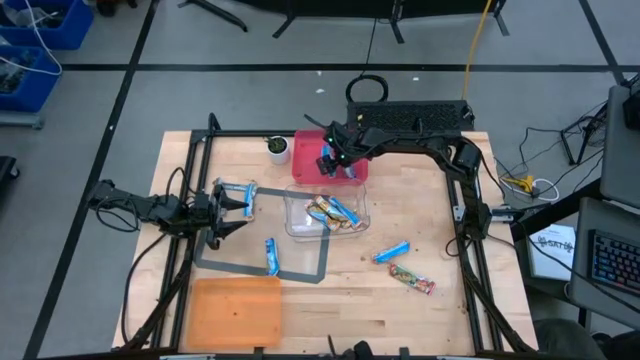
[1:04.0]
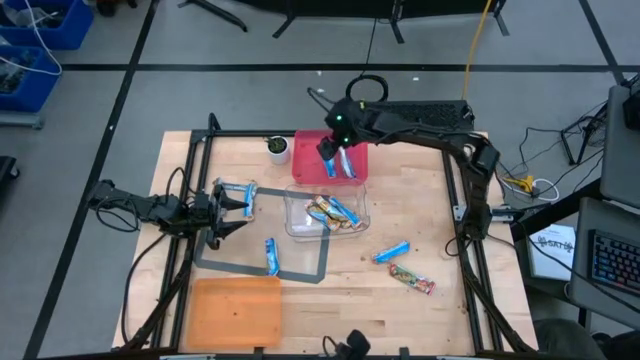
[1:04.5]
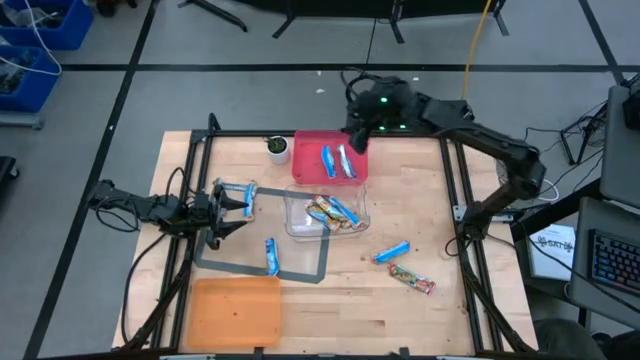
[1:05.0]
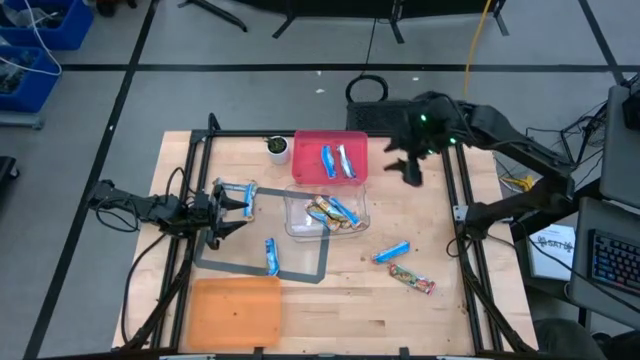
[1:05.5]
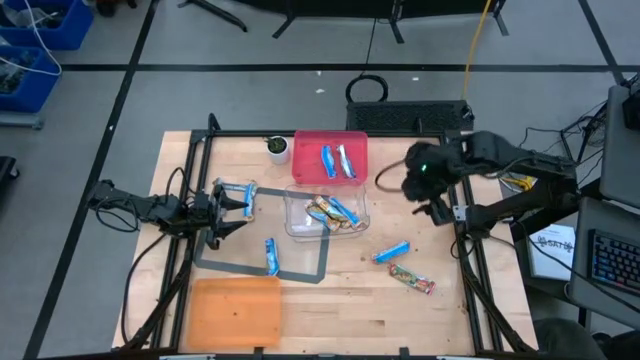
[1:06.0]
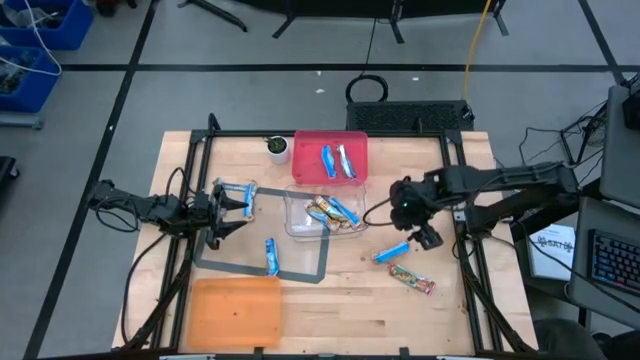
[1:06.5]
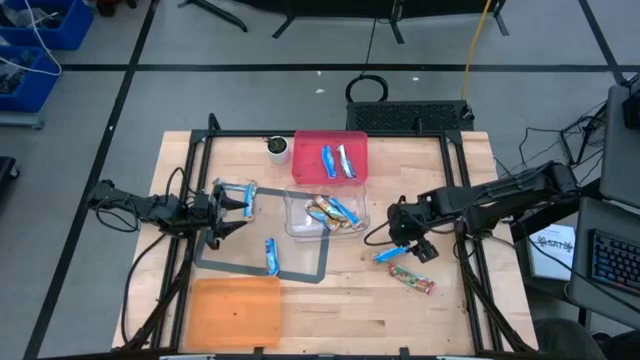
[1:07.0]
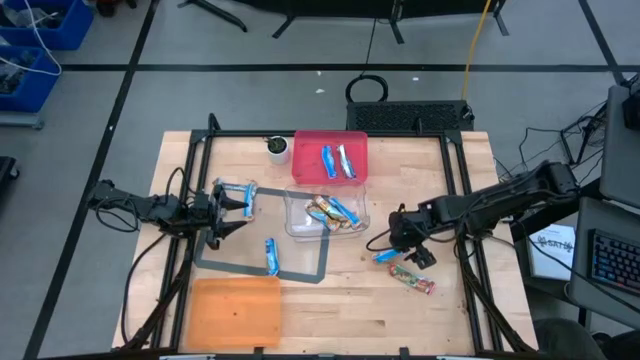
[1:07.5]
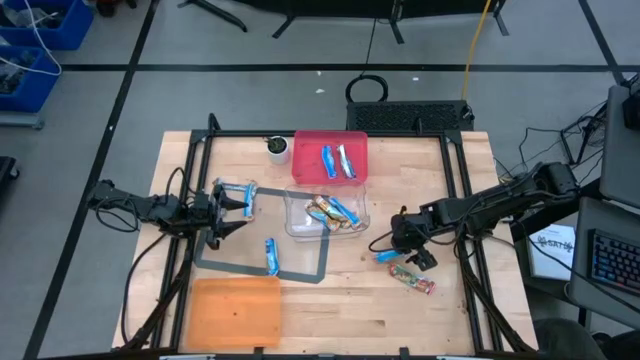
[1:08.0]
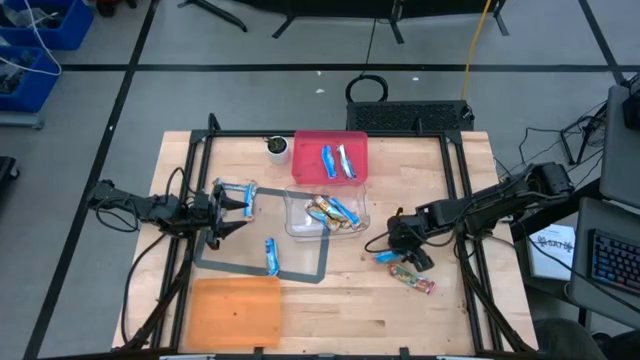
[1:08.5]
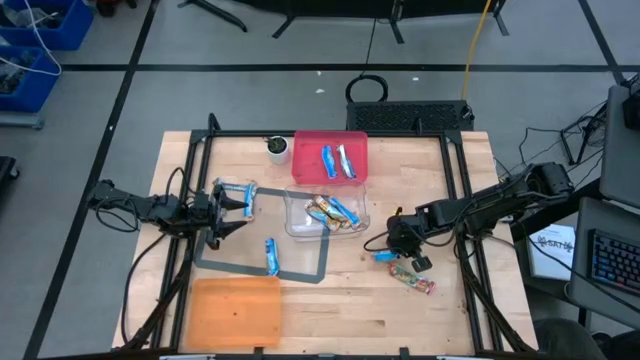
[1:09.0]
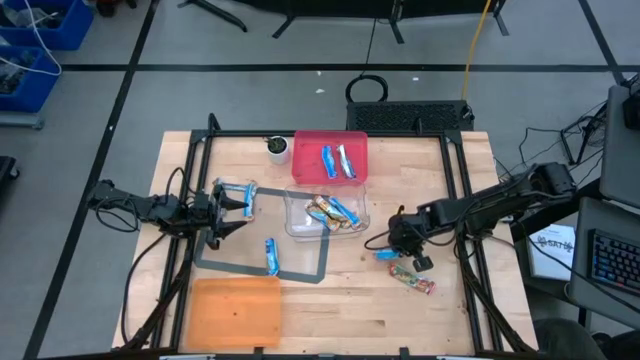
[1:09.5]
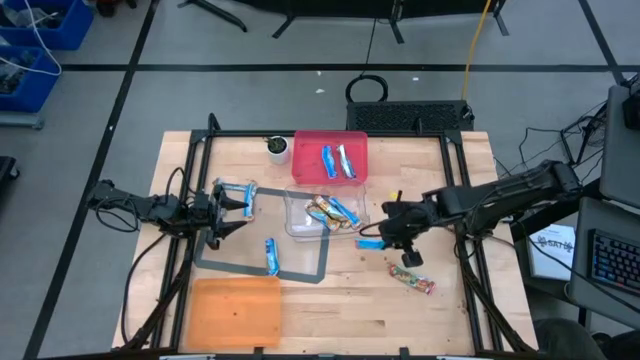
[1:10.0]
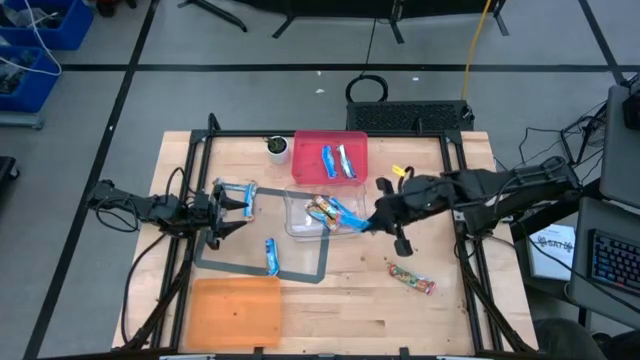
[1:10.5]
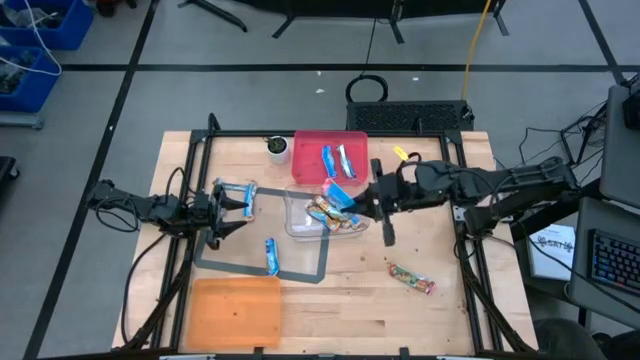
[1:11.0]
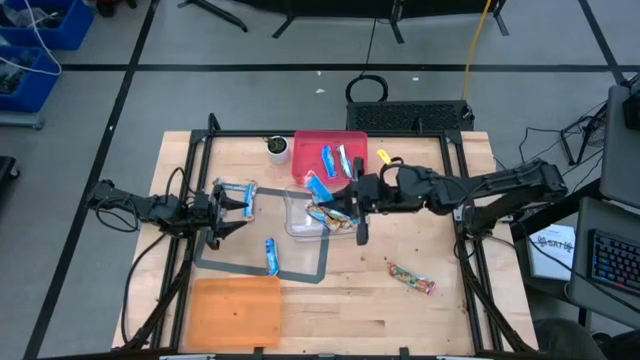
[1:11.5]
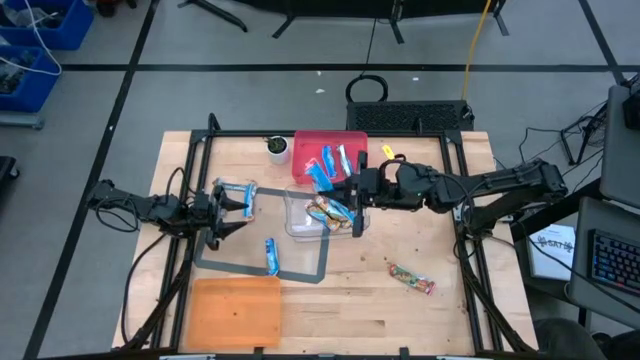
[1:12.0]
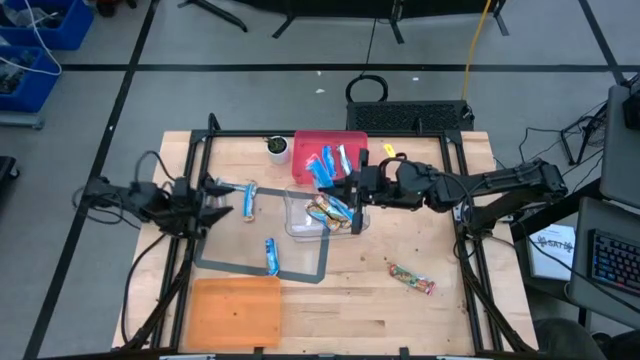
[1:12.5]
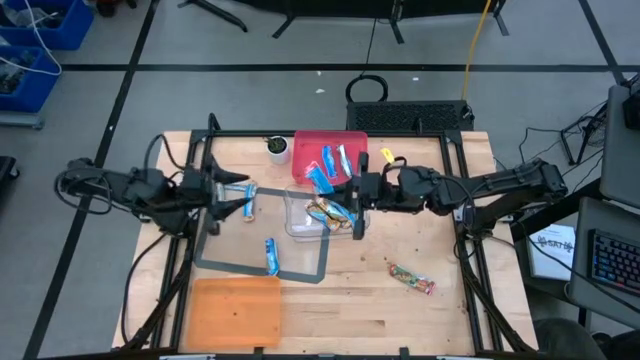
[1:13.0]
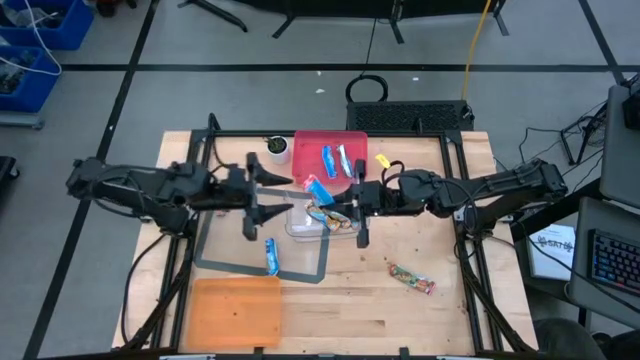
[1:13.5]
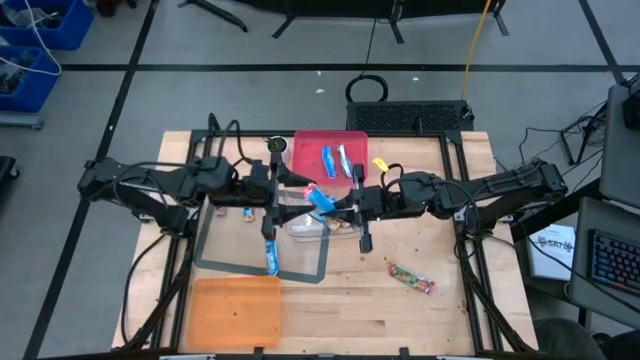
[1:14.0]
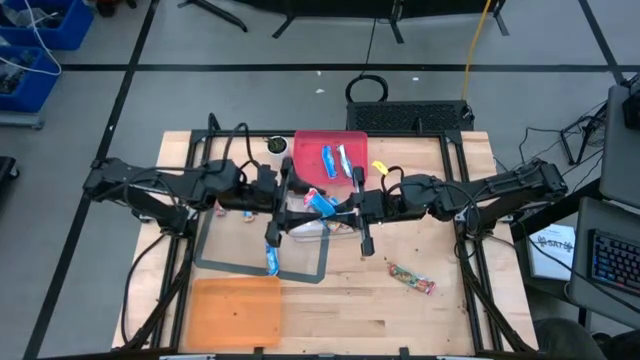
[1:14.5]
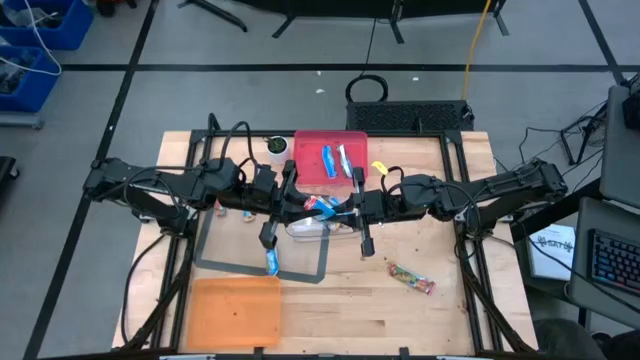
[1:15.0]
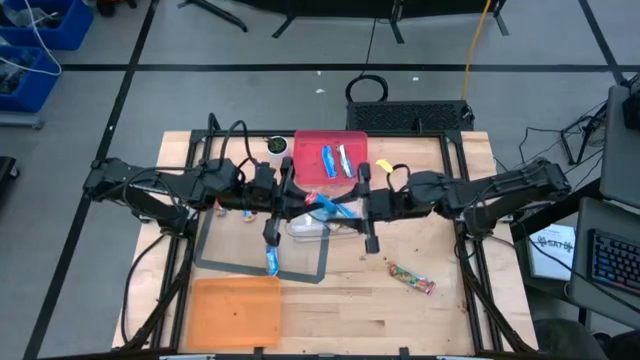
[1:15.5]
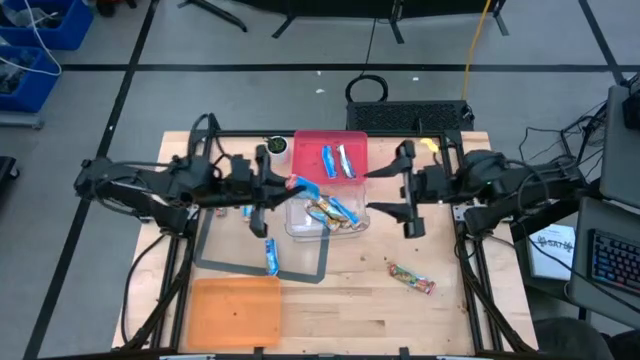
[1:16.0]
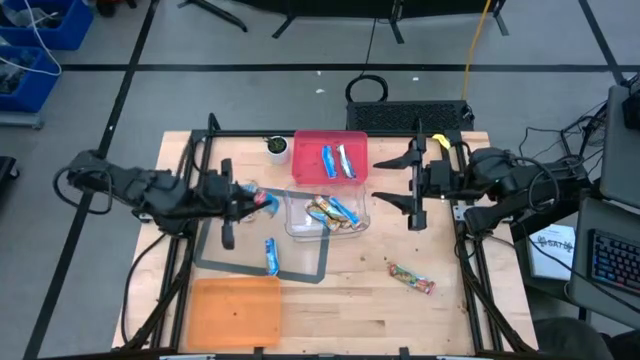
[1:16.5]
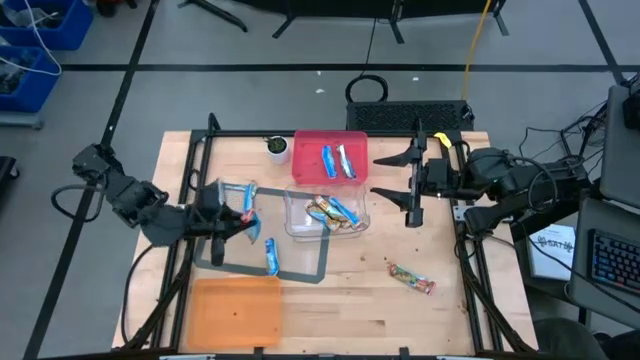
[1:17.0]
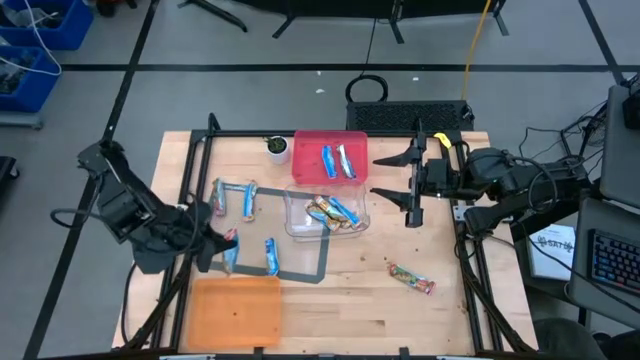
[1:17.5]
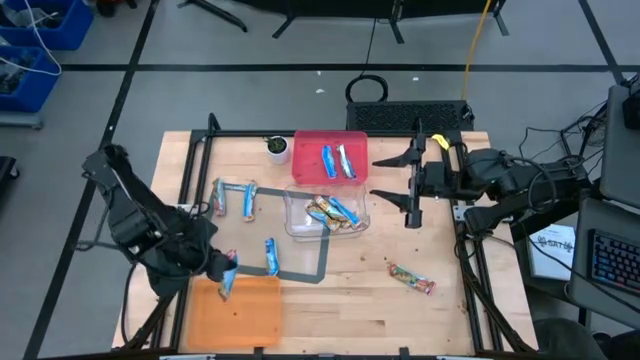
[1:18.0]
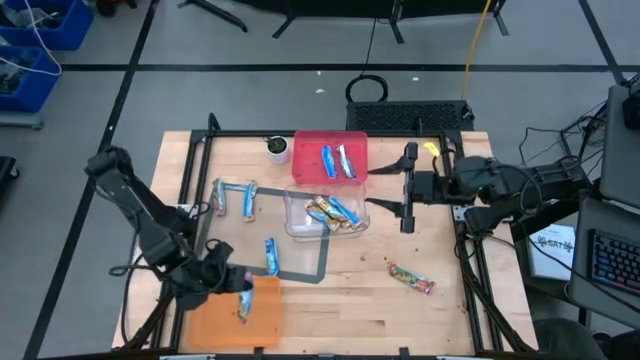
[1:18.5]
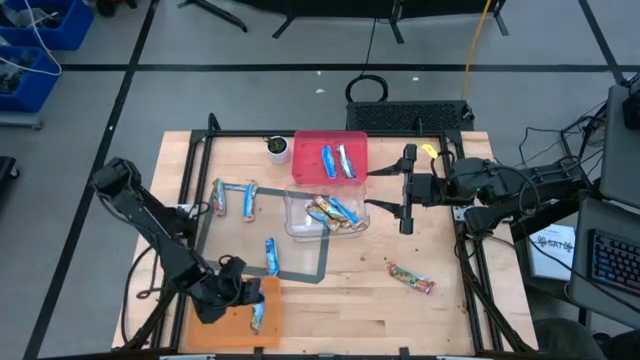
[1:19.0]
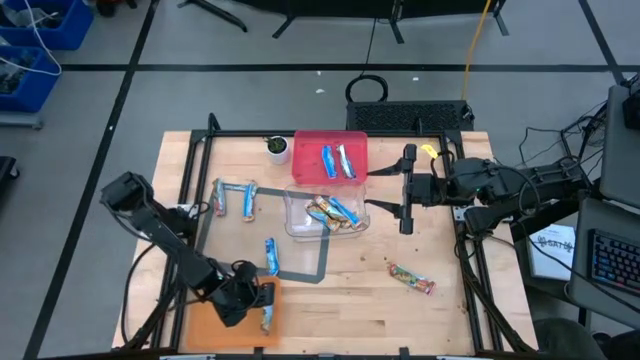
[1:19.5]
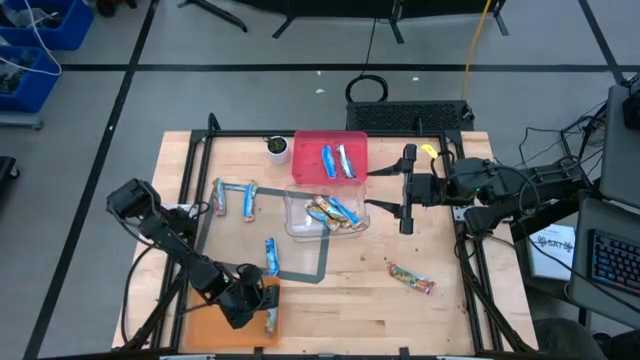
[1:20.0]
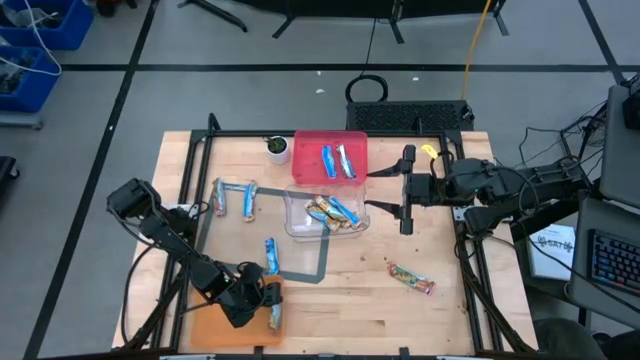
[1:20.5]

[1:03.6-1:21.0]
Task: Pick and place Granola Bars by type
Put the top red granola bar into the orange bin

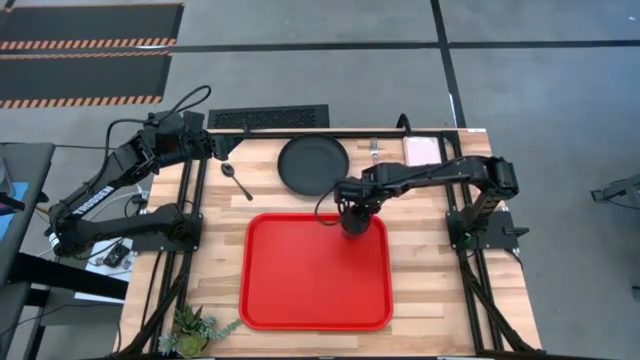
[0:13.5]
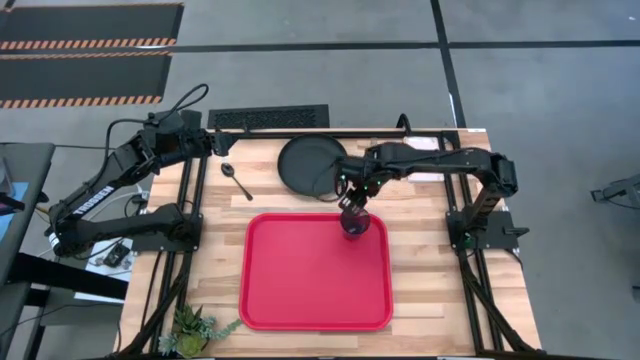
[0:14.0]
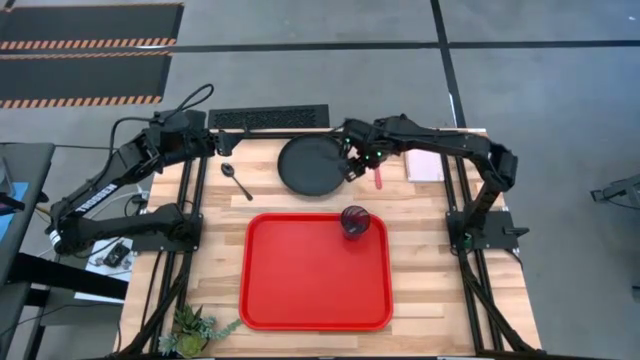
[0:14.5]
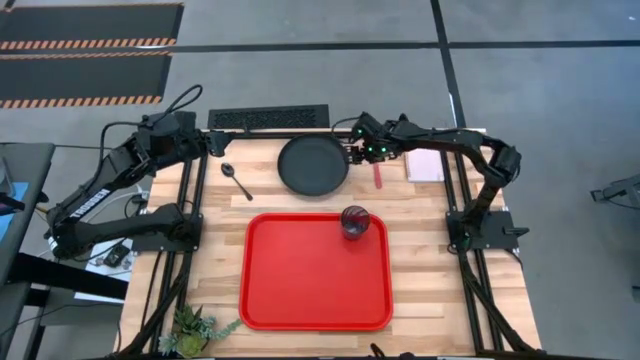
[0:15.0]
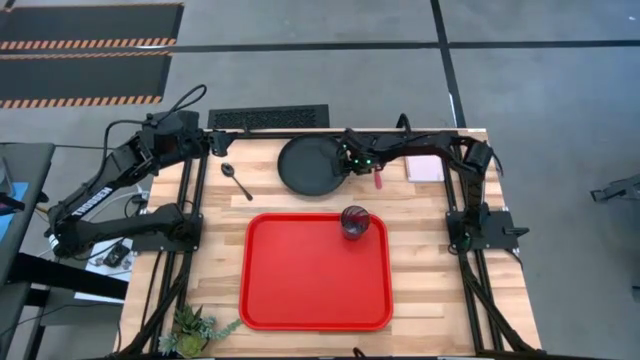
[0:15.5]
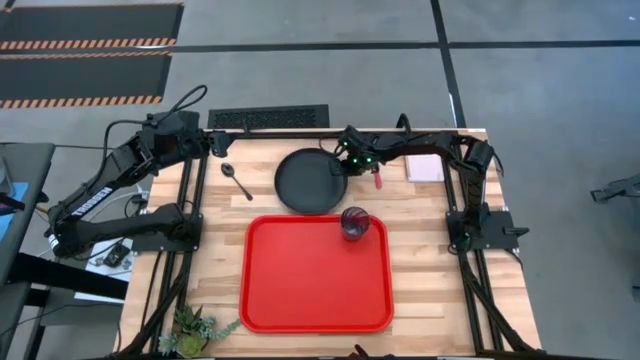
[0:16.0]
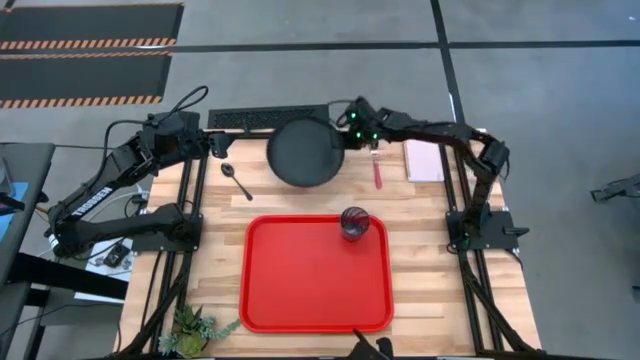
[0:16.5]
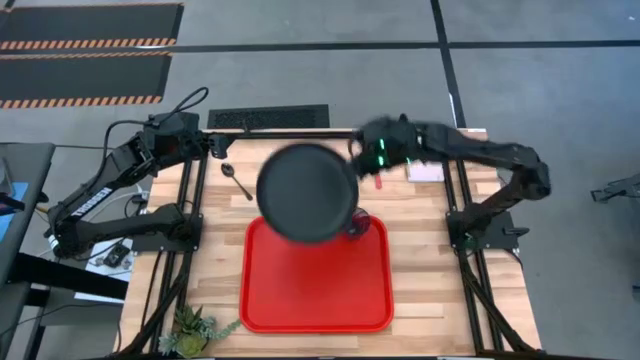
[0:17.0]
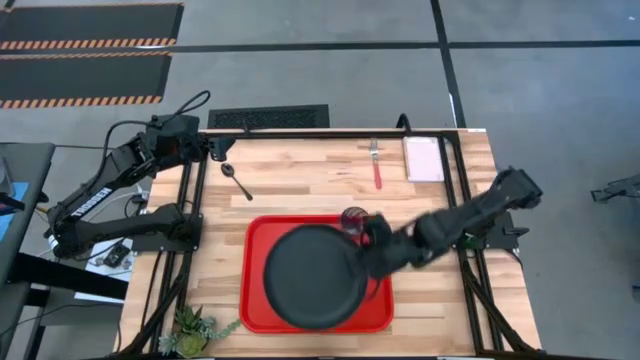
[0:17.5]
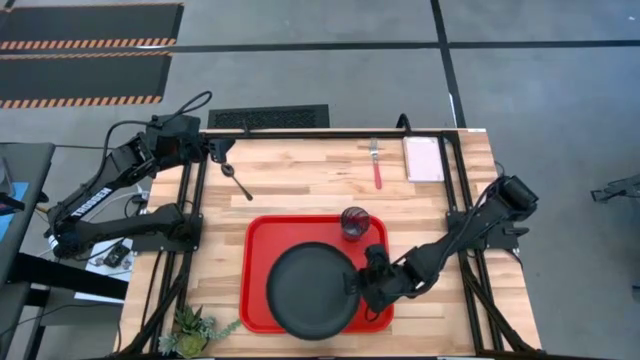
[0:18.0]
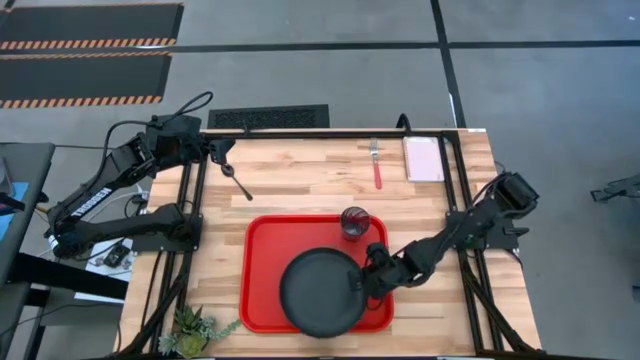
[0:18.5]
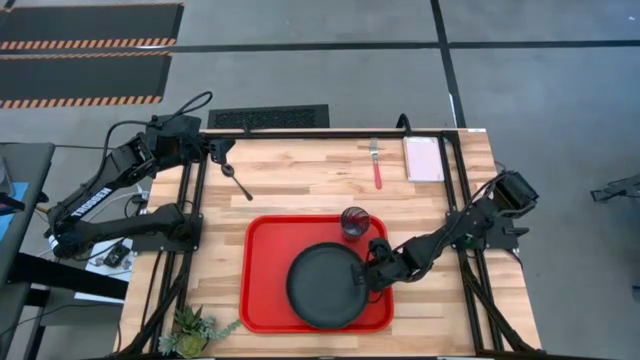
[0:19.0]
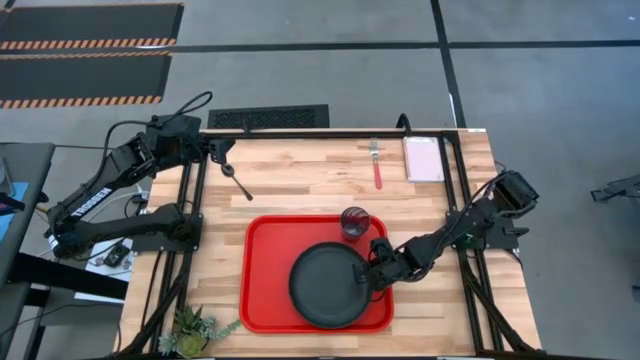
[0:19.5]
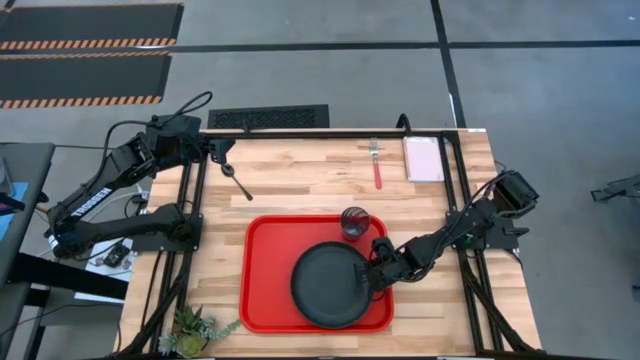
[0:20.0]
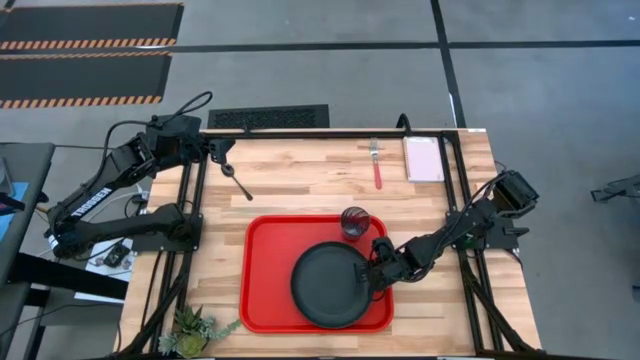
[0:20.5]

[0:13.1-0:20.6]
Task: Pick and place plate/cup/fork/spoon on tray
Put the black plate on the center of the red serving tray
